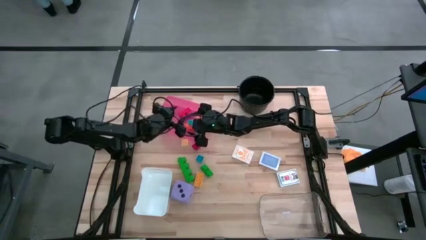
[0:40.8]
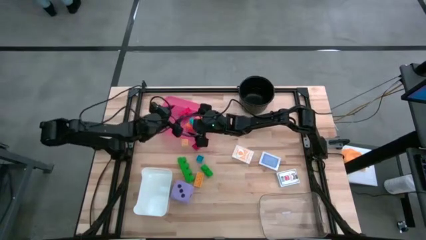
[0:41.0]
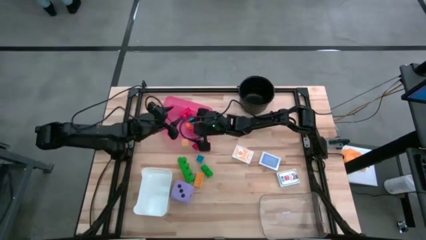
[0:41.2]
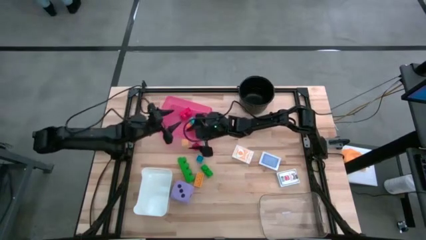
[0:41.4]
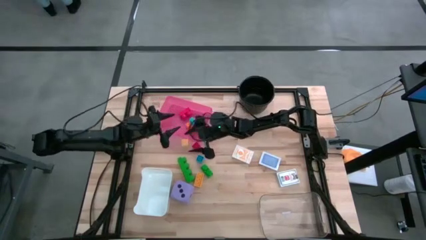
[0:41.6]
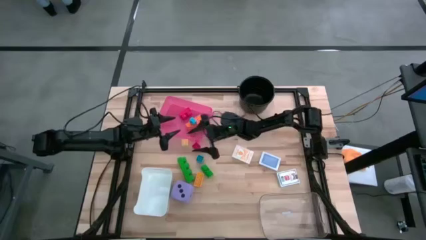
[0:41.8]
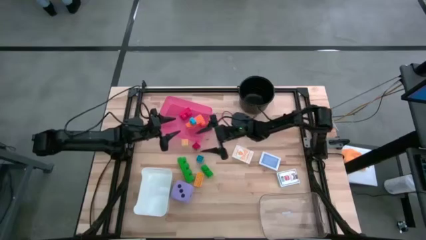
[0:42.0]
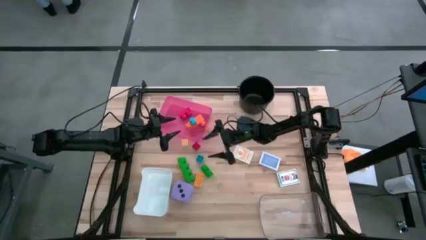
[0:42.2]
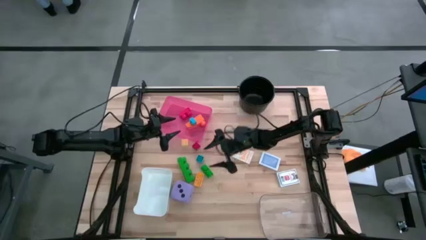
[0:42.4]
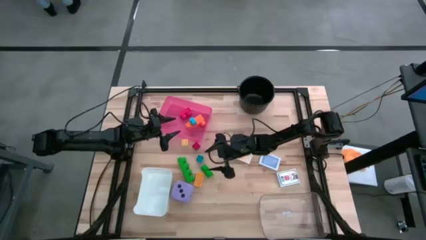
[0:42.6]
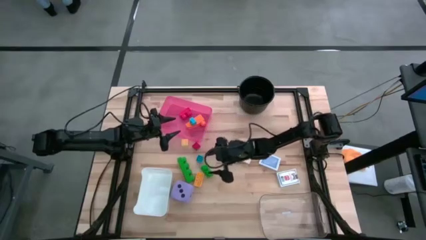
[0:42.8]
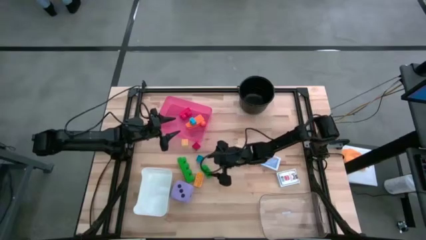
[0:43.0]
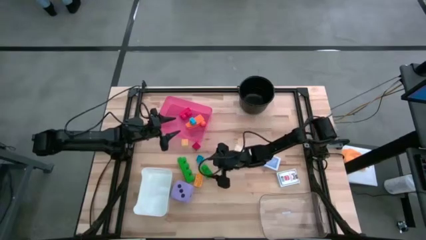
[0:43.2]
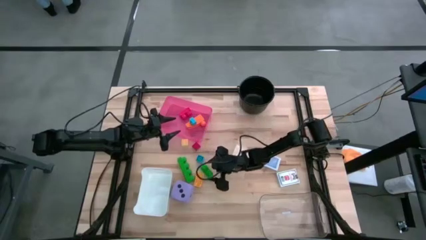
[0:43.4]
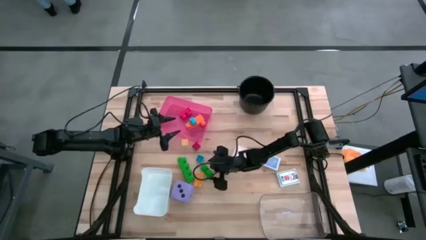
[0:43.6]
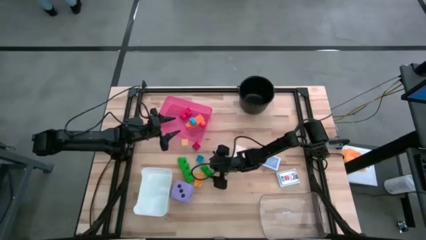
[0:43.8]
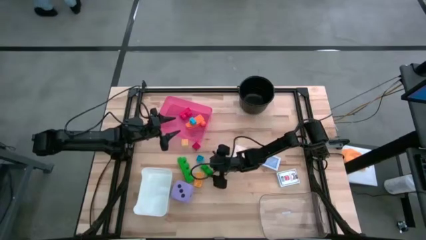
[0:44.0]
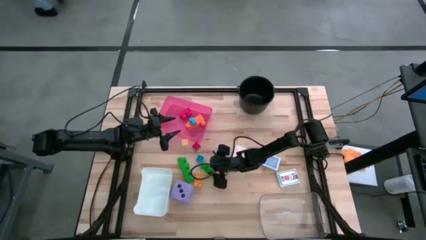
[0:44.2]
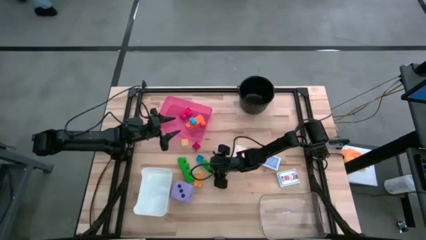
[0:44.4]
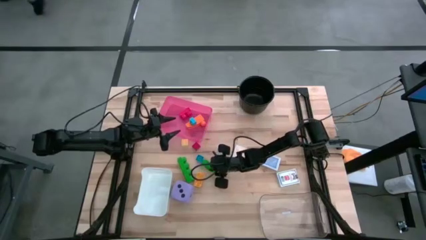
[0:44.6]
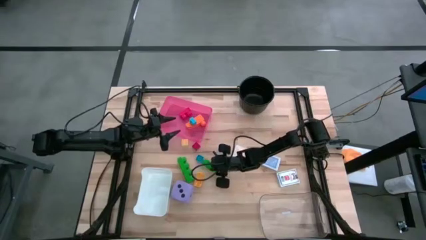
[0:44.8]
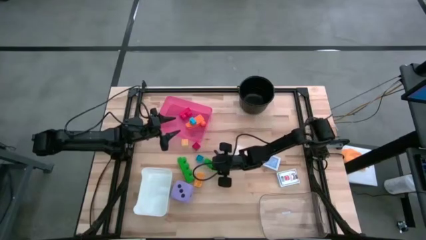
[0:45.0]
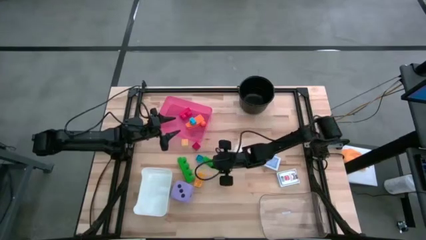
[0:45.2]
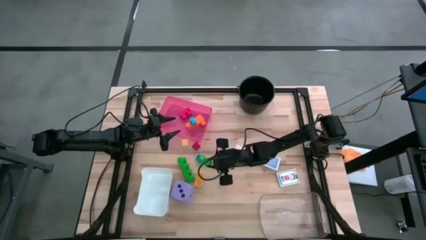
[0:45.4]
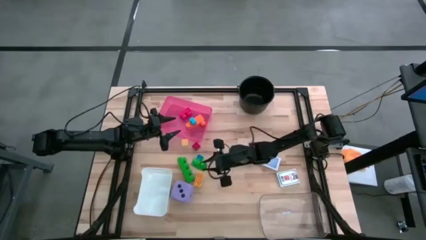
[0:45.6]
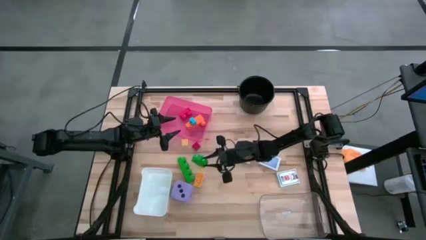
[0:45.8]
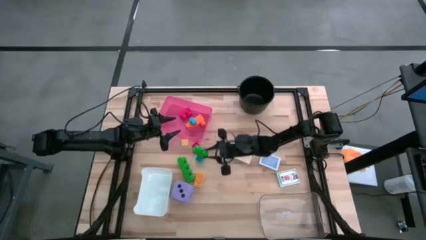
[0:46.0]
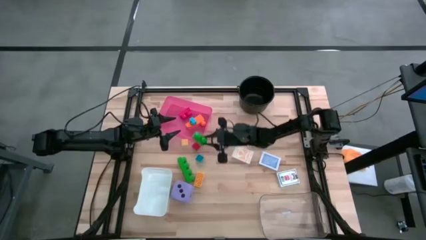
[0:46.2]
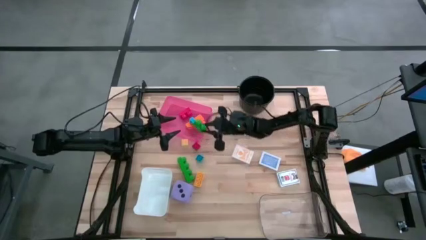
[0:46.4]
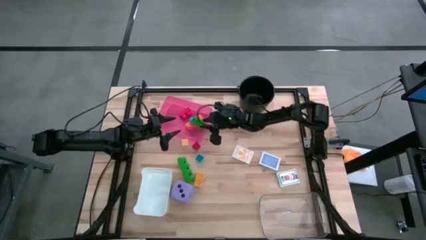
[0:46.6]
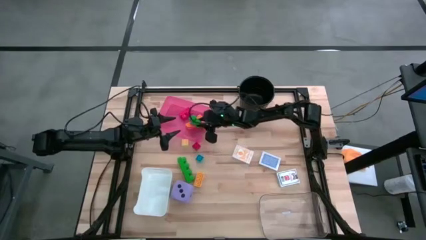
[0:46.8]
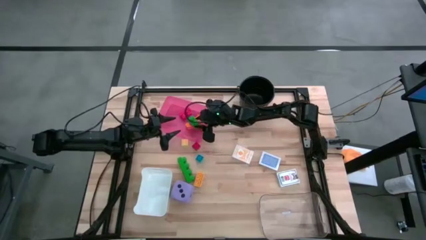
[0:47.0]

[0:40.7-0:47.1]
Task: Pick & Place Toys
Put the right green game piece into the red bin

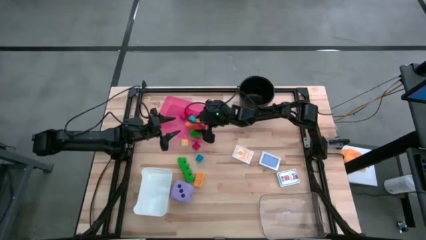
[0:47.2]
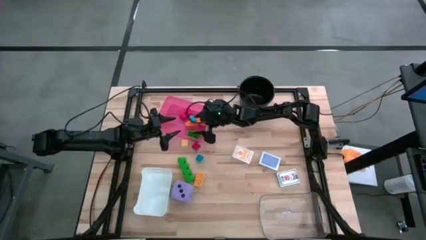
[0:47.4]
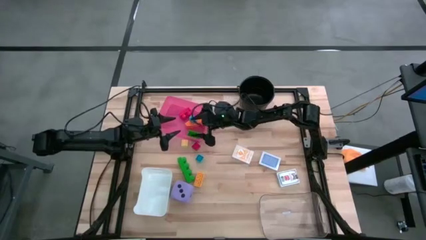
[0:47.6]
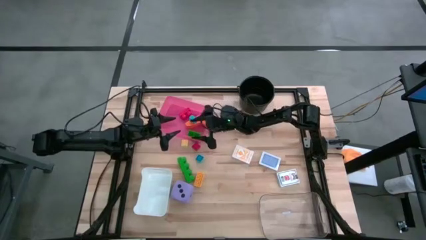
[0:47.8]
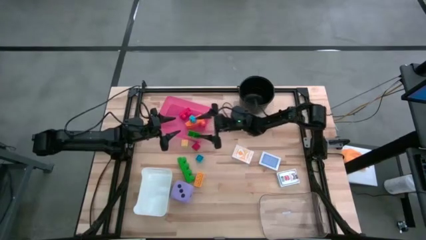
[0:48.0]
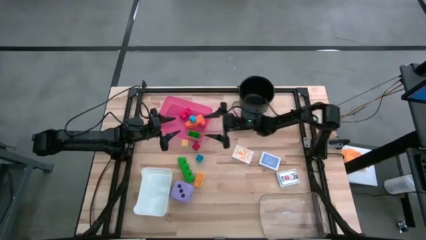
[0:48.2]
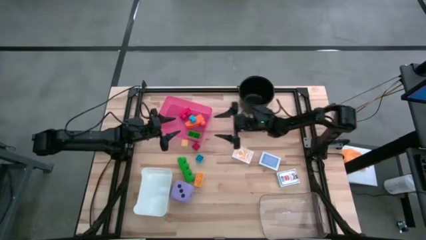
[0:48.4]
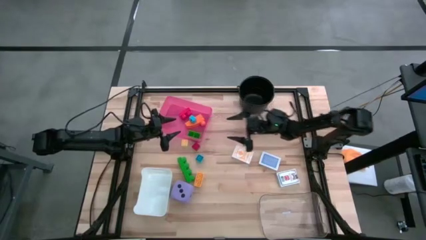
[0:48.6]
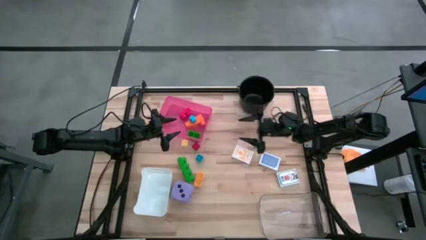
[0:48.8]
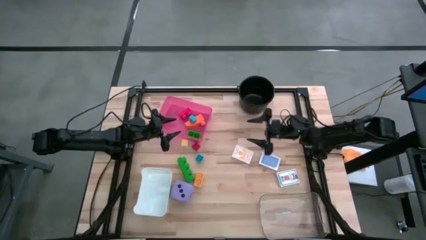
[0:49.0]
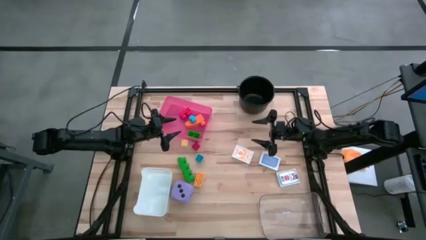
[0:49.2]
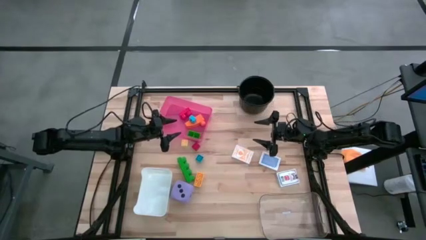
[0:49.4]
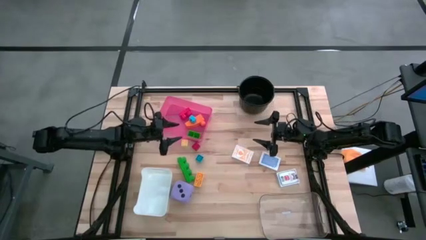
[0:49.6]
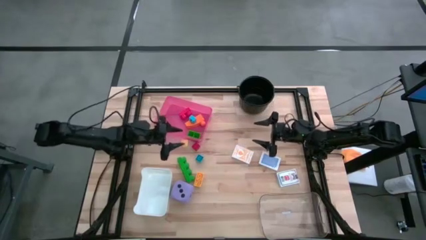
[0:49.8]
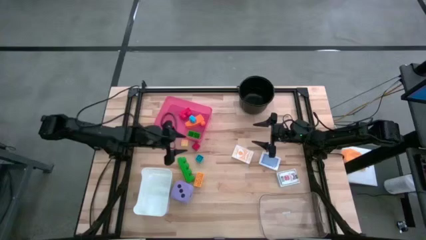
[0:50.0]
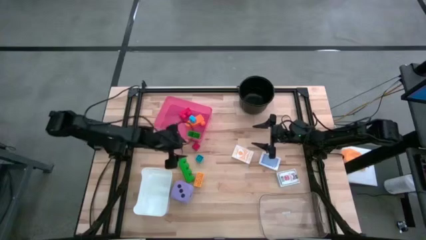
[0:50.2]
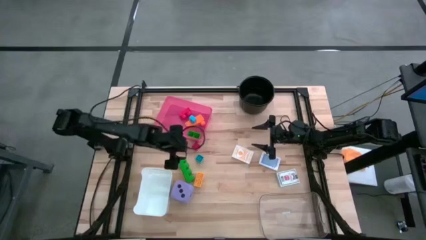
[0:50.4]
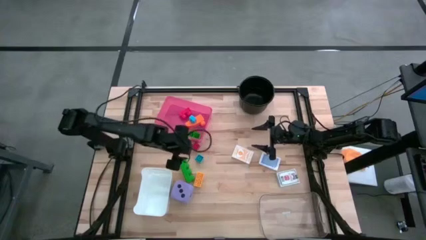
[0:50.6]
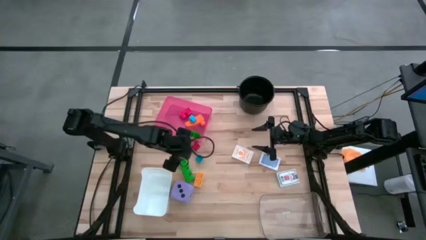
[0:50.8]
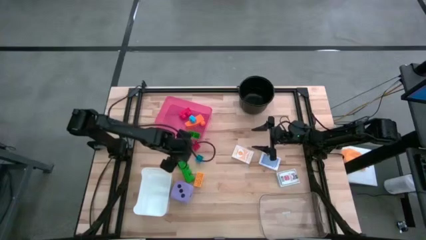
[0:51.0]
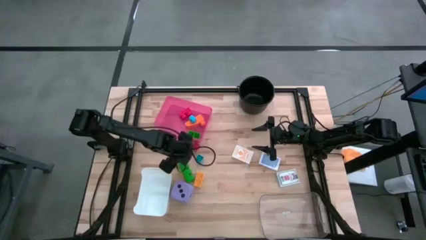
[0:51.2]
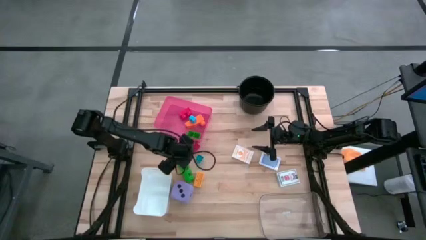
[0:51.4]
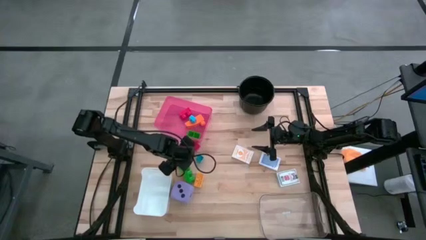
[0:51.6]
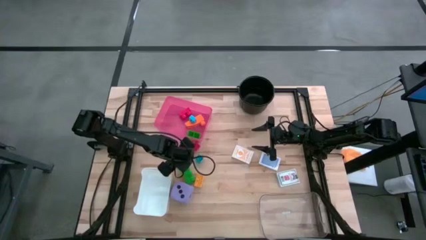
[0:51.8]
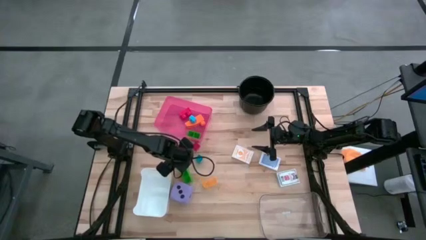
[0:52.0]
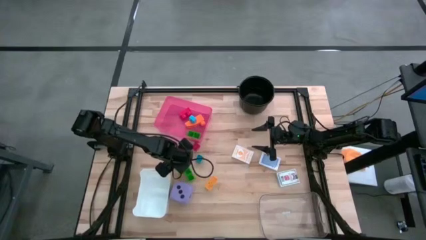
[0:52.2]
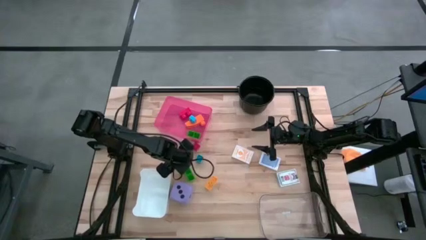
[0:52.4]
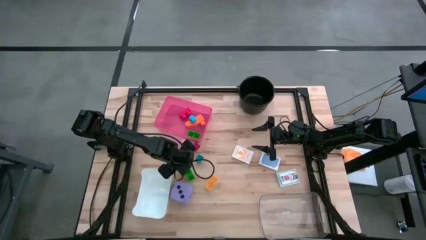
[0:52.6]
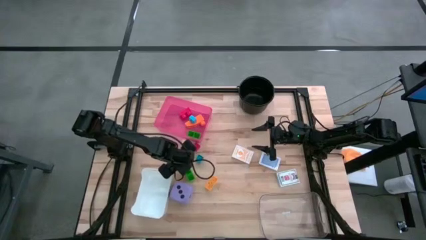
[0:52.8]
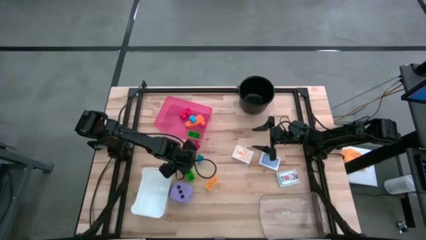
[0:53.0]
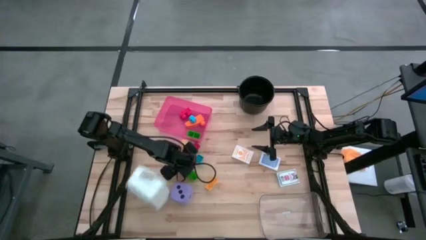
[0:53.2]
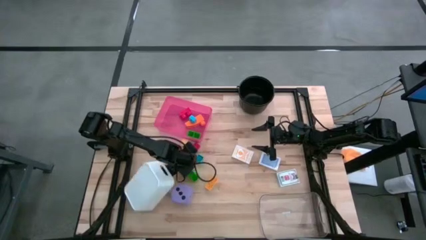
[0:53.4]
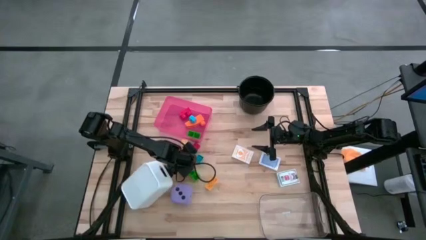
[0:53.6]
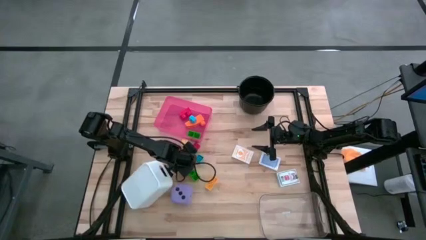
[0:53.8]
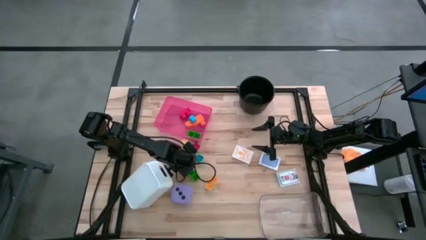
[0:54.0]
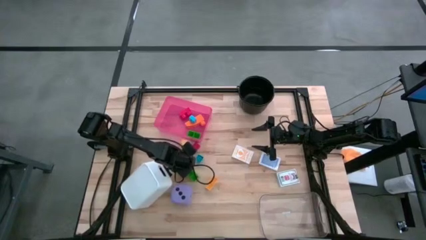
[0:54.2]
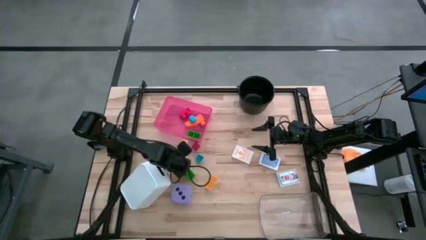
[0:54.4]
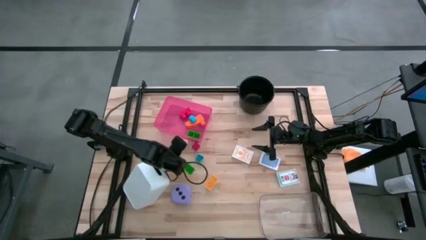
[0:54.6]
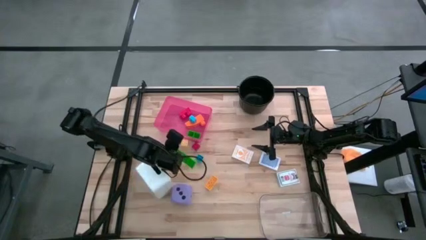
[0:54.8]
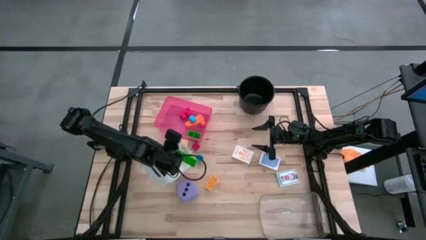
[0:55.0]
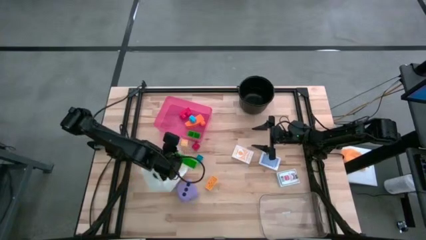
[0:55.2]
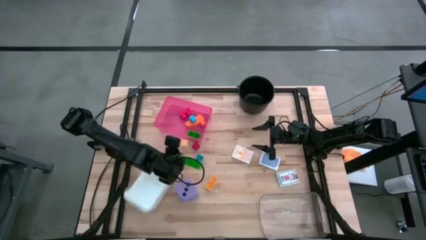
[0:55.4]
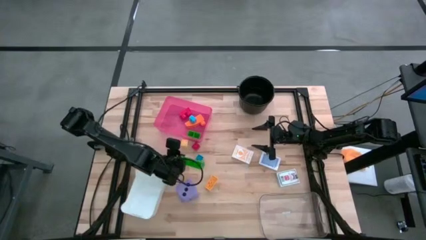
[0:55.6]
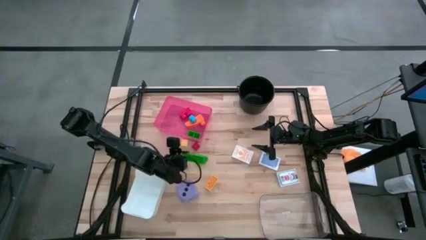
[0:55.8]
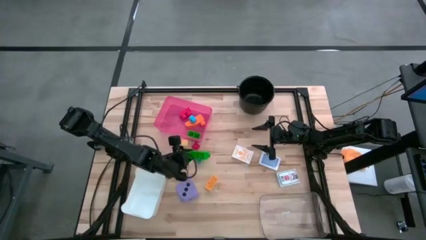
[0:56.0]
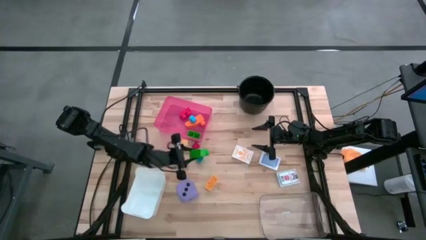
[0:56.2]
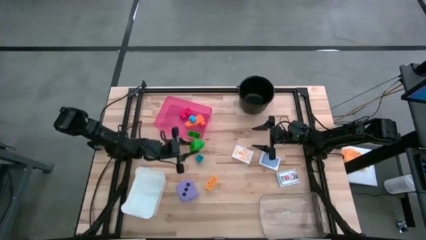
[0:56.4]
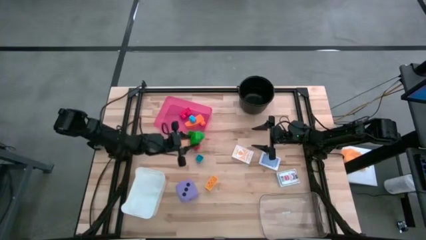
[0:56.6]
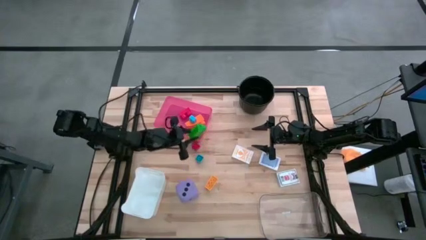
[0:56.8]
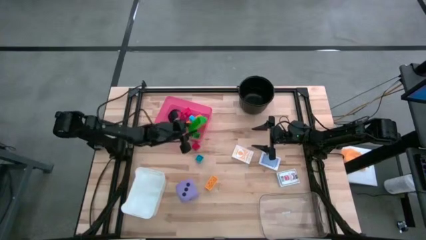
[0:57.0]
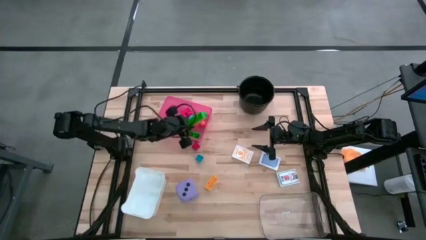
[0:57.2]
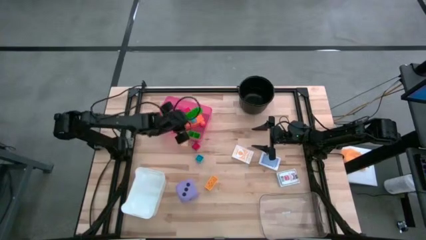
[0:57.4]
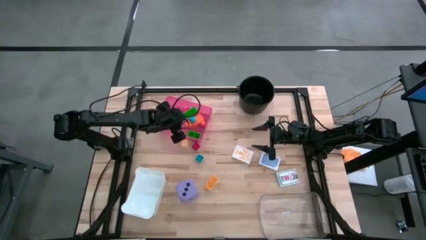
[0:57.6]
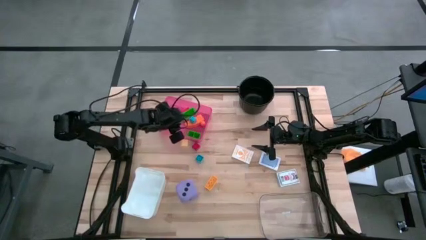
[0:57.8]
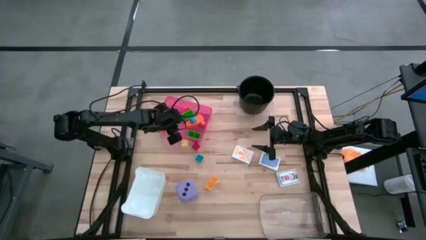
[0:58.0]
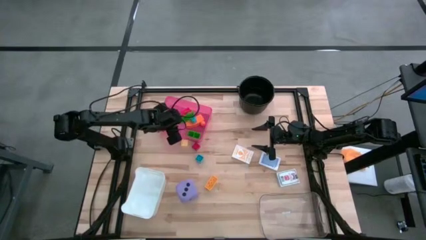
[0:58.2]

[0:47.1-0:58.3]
Put the green game piece into the red bin
